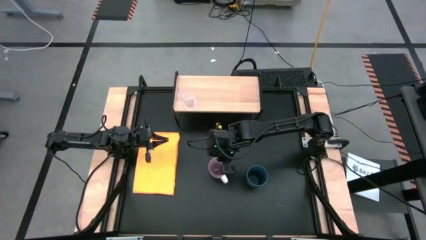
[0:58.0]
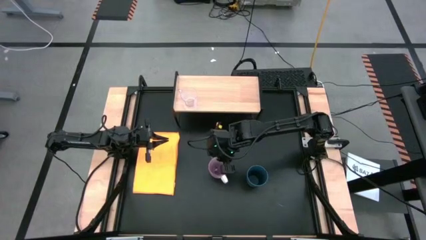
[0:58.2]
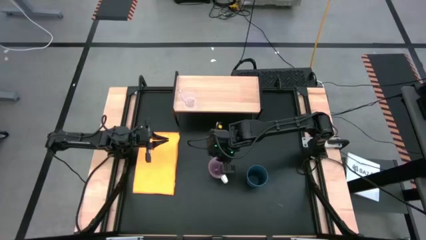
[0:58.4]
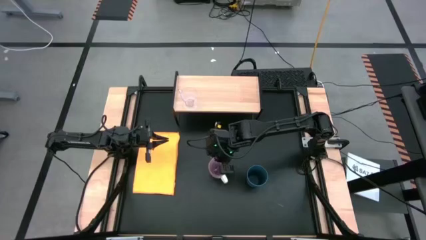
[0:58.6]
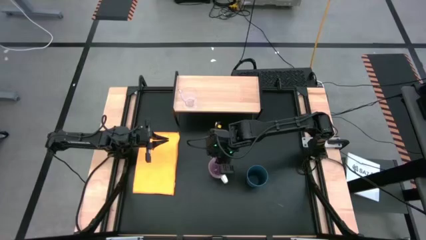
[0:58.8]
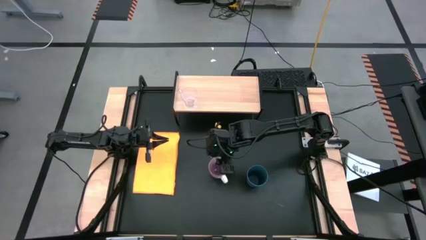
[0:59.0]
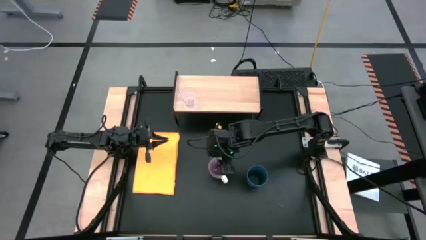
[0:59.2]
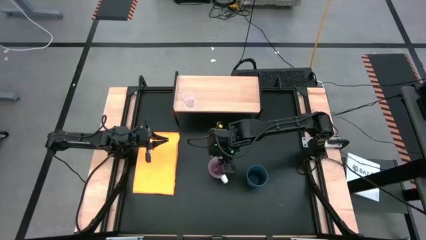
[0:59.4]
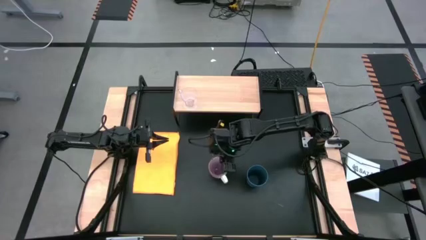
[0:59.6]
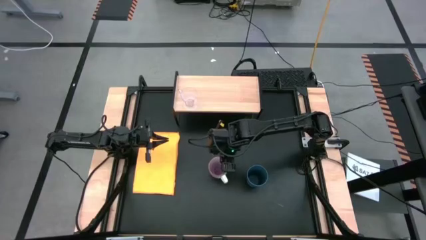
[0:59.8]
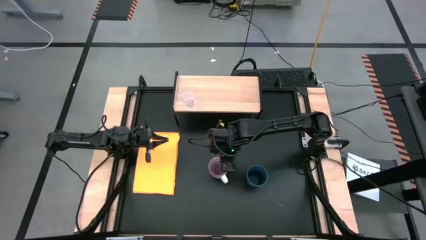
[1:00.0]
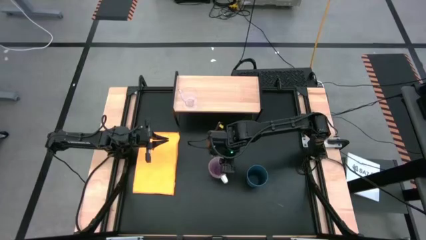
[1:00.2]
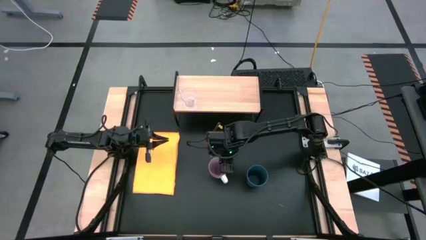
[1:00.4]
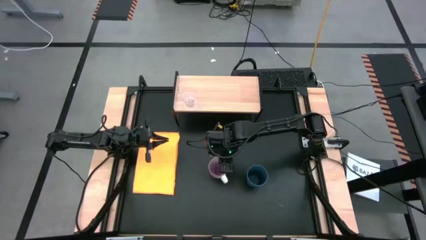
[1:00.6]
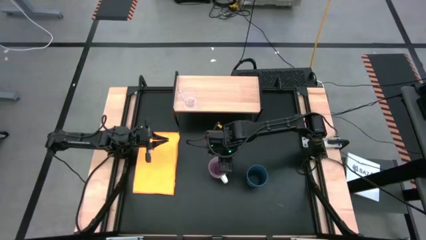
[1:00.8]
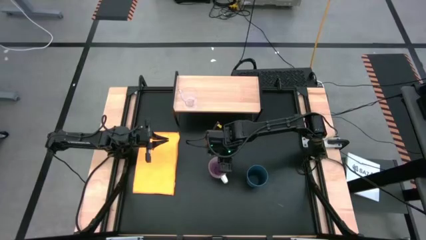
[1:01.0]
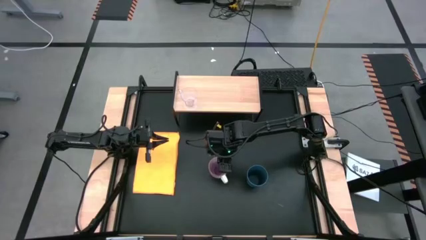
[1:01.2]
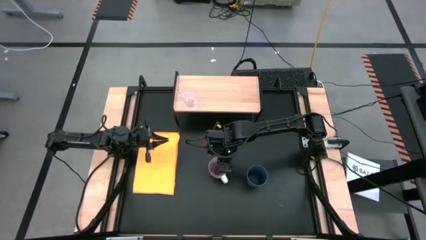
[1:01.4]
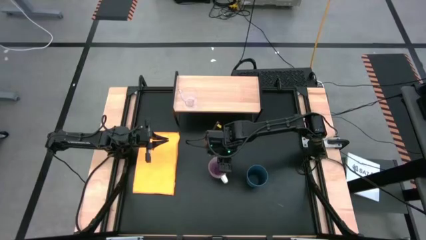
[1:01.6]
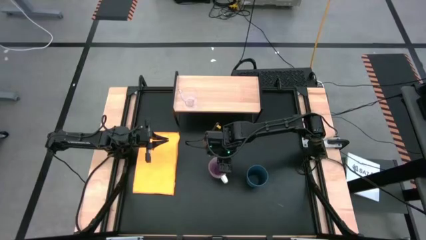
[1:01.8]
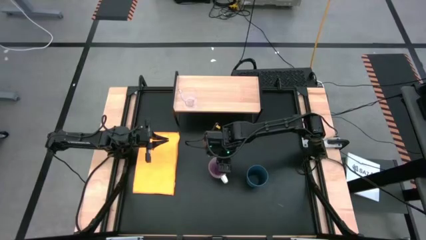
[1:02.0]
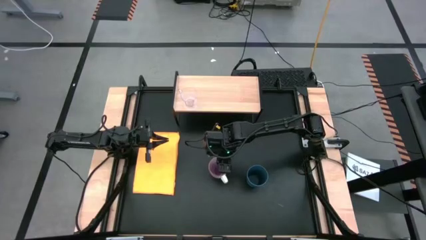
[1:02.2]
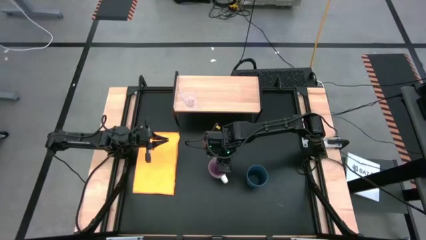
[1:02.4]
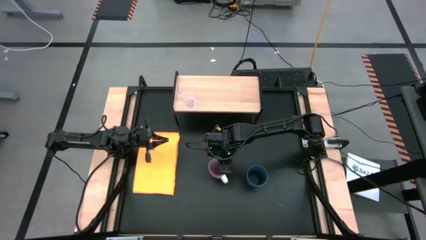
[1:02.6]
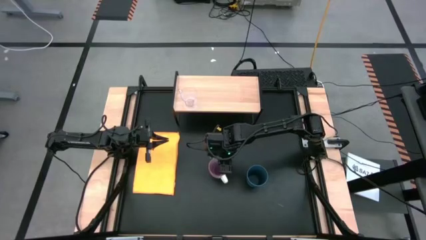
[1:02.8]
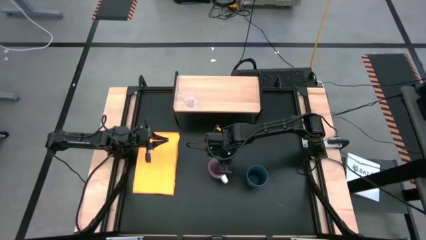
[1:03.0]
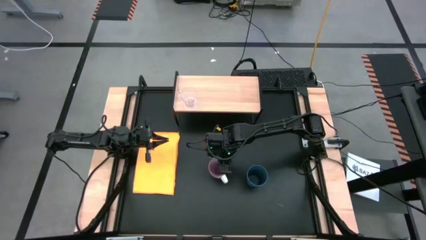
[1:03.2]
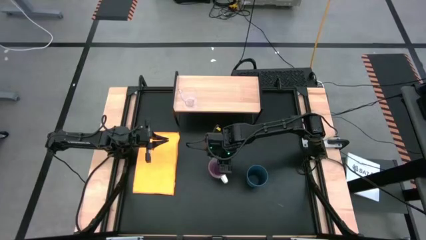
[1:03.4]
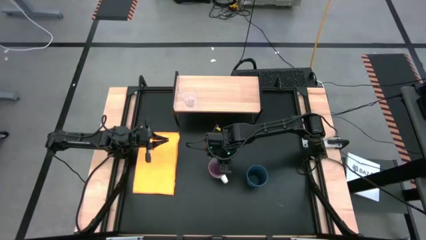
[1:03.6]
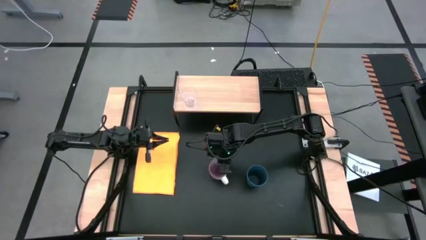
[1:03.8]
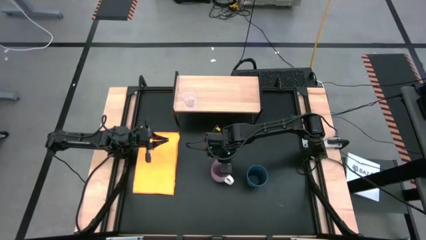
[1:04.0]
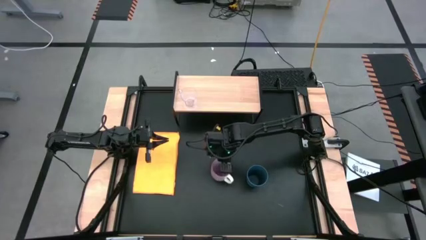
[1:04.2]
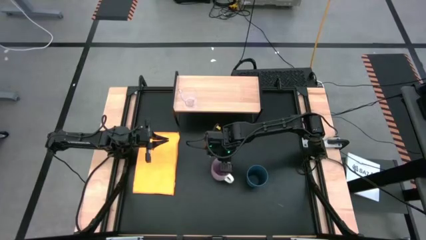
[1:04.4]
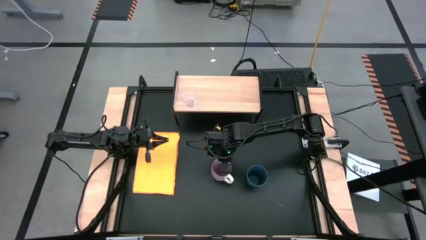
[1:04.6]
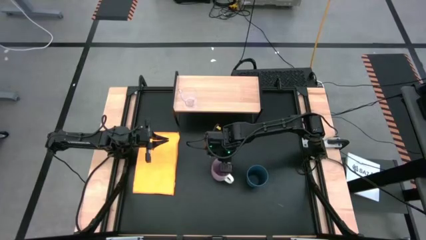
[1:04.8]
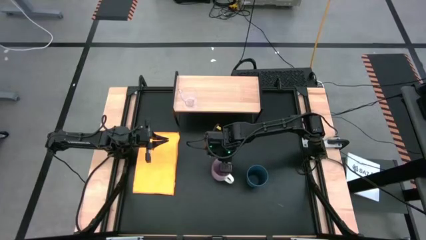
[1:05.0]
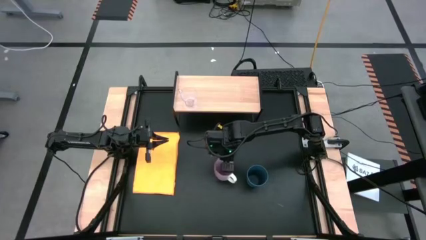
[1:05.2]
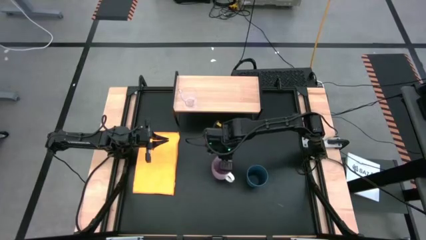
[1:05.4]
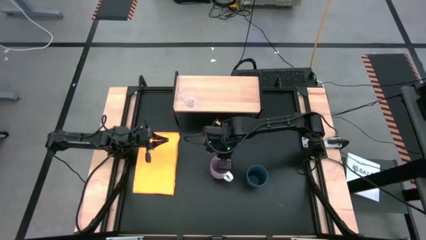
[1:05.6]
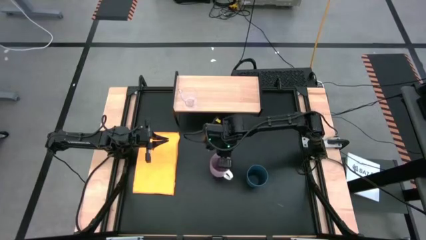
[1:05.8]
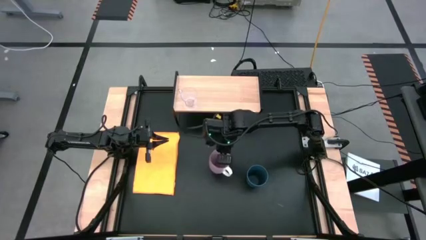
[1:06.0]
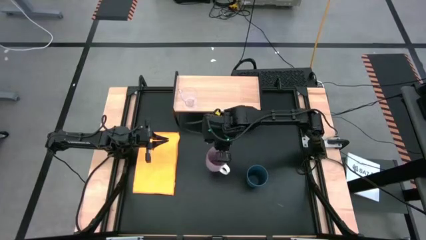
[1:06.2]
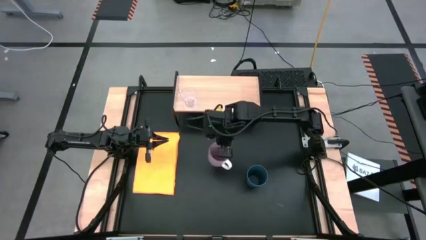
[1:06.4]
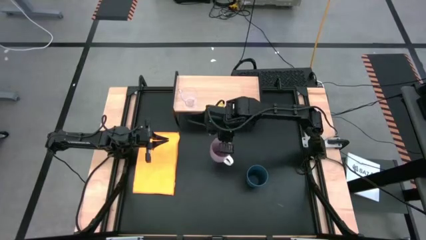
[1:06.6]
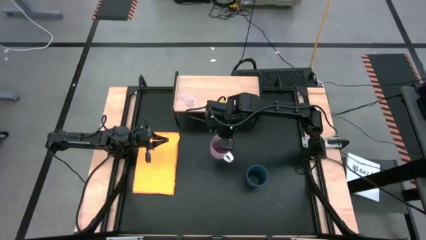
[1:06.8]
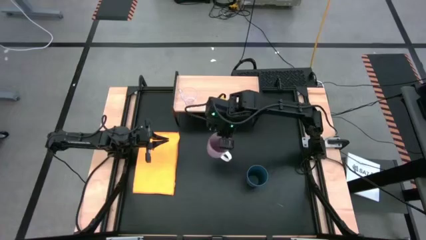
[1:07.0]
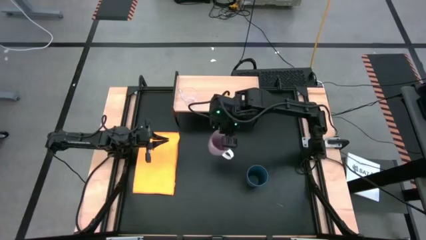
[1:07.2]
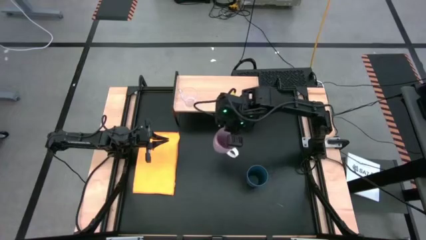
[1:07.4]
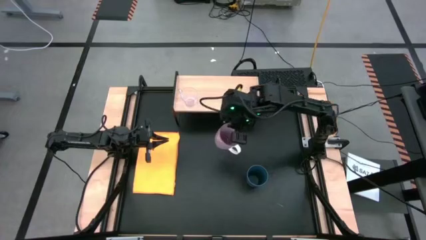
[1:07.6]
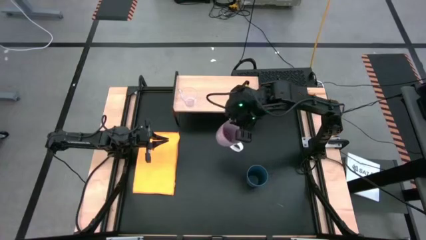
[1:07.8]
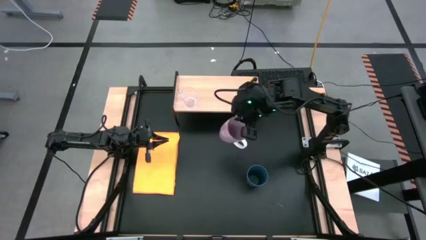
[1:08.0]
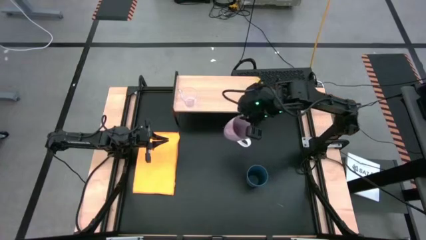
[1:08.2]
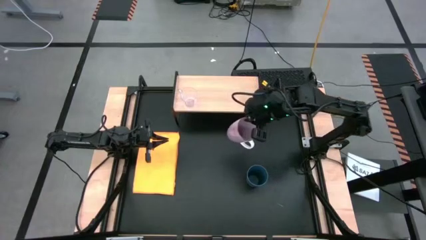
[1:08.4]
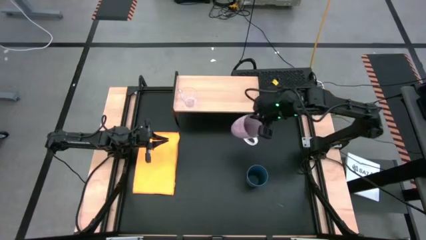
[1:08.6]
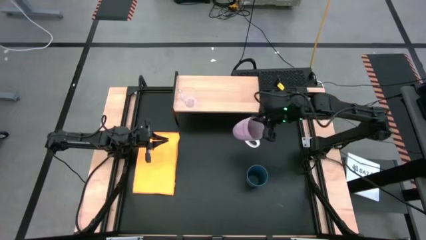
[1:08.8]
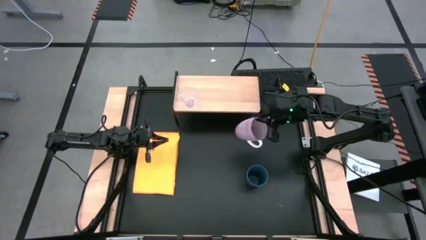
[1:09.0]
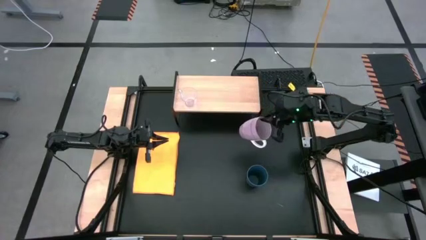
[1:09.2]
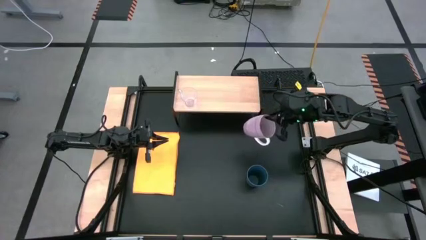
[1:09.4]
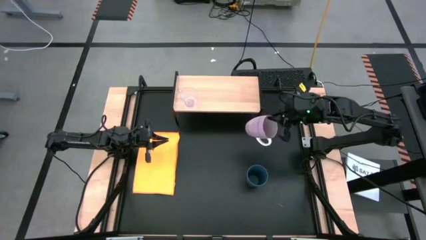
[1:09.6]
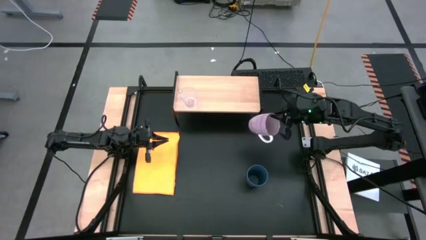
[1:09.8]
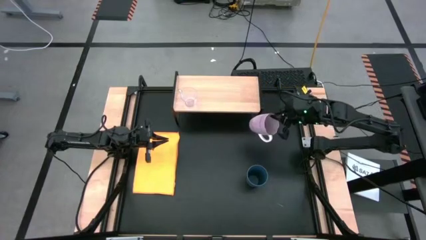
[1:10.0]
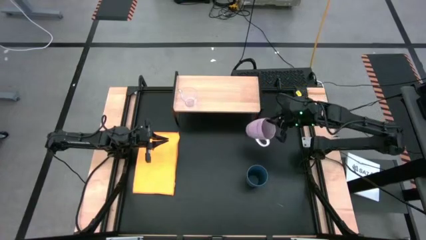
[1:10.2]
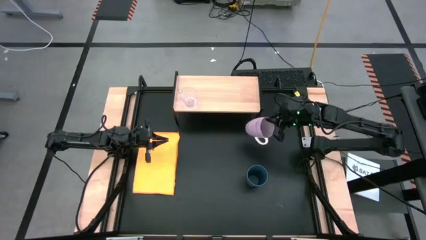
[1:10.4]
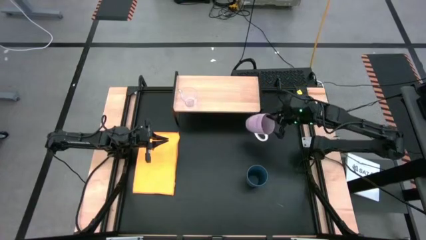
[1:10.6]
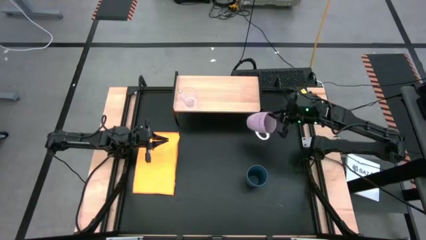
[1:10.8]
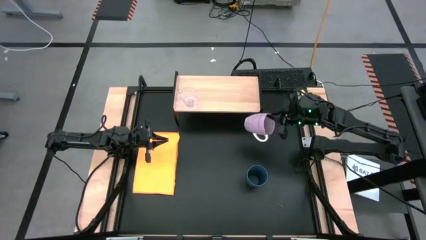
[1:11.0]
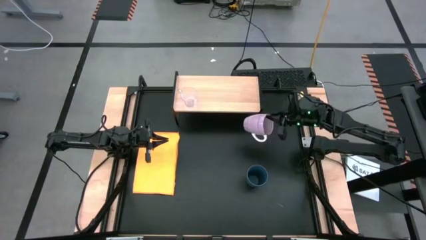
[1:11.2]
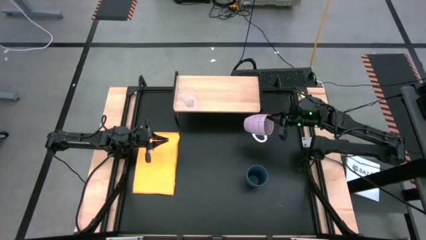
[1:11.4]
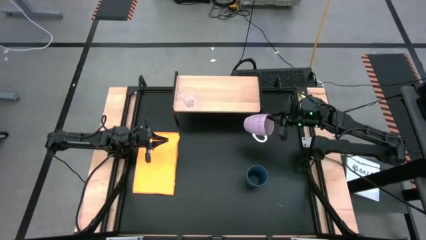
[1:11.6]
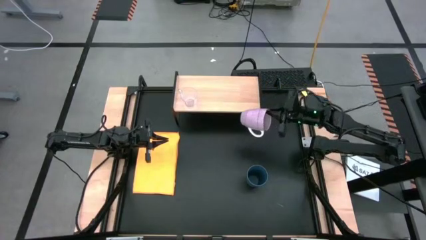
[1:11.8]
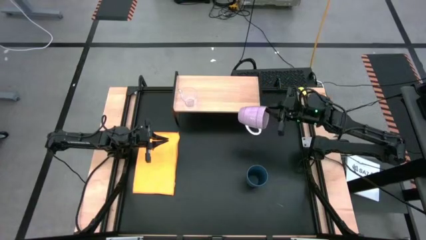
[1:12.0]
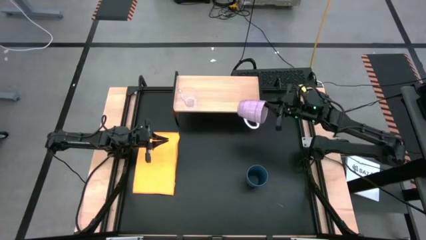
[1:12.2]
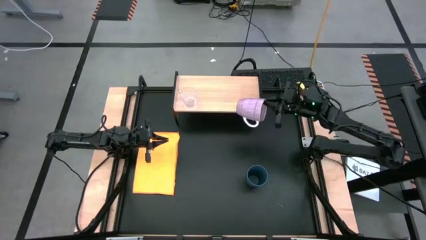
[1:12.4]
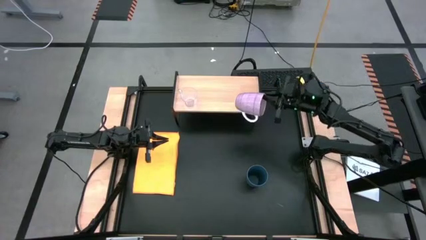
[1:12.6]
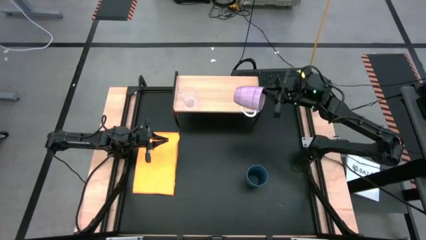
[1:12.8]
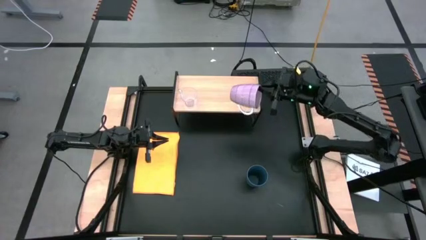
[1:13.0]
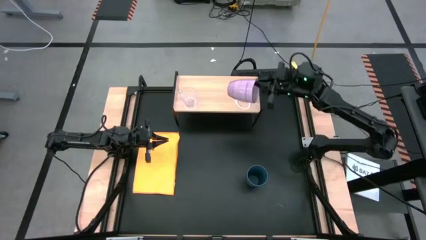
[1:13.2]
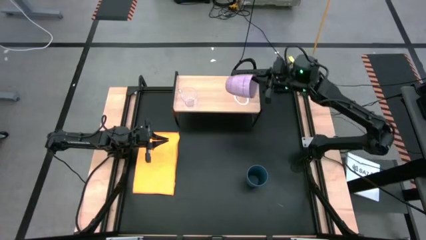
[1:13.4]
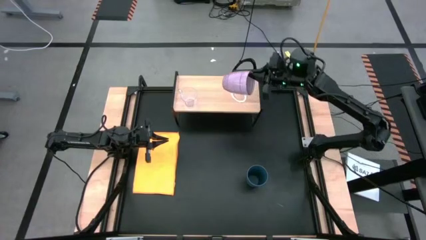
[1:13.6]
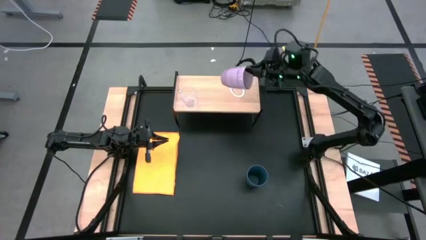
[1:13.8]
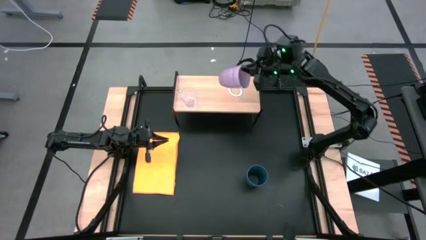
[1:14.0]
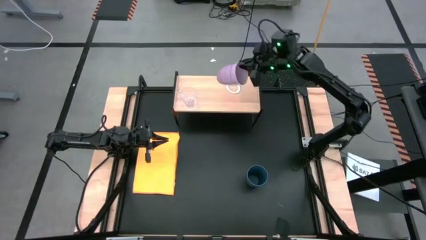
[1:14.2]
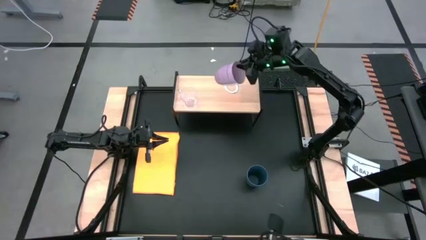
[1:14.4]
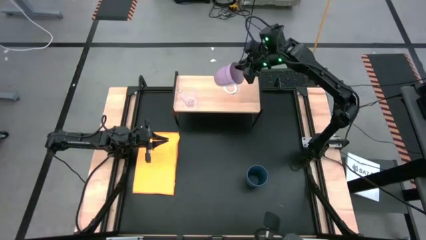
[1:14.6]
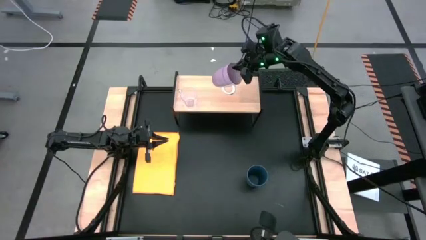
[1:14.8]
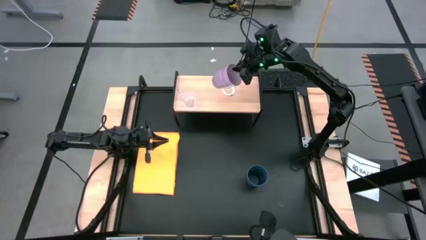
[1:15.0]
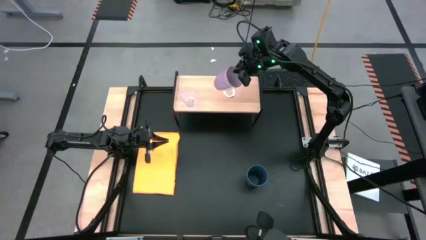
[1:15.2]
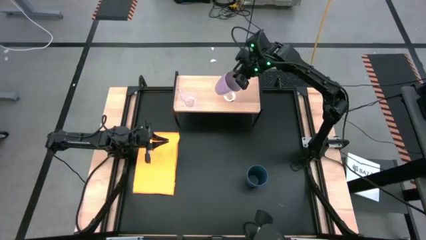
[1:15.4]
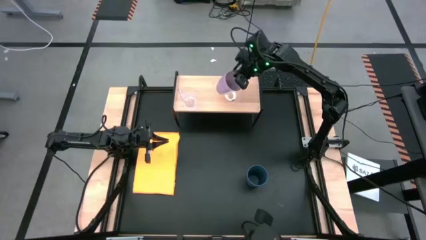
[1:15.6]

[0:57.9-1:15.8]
Task: Stack small to large cups/mugs on shelf
Put the purple mug on the shelf
